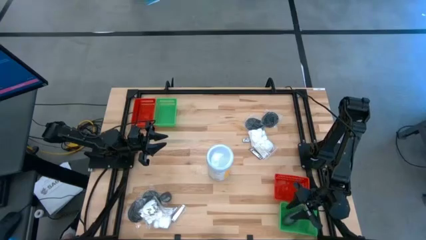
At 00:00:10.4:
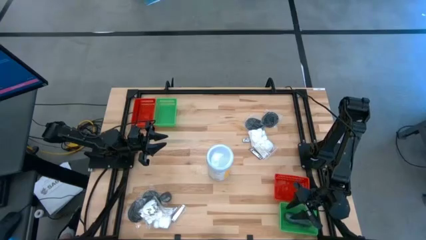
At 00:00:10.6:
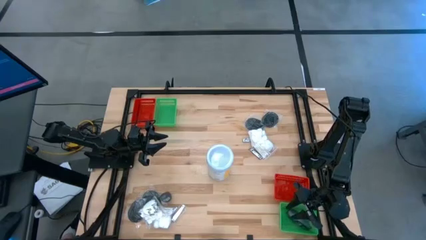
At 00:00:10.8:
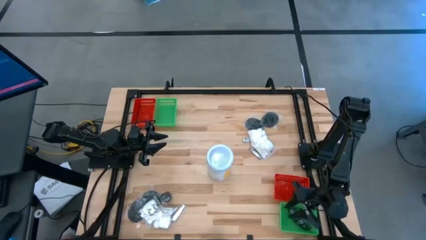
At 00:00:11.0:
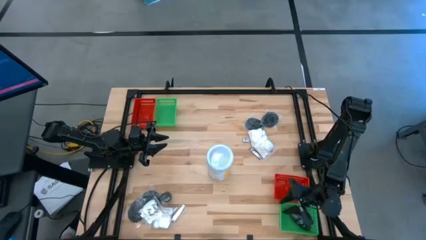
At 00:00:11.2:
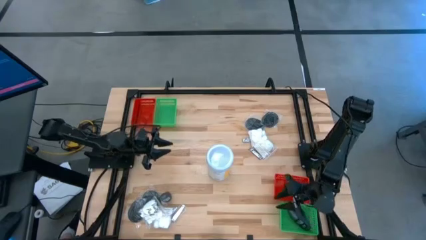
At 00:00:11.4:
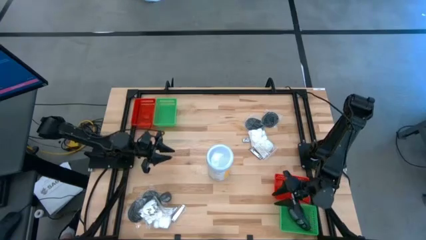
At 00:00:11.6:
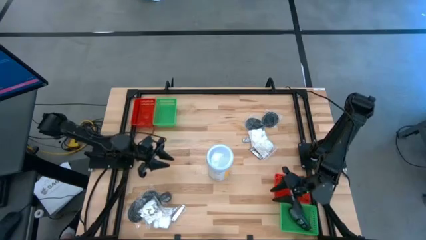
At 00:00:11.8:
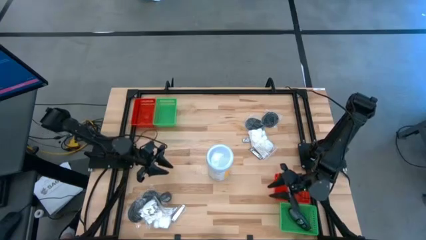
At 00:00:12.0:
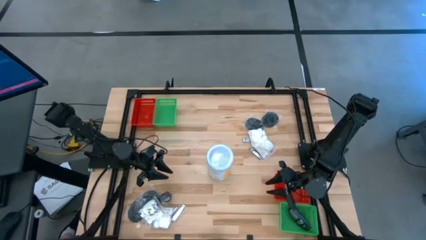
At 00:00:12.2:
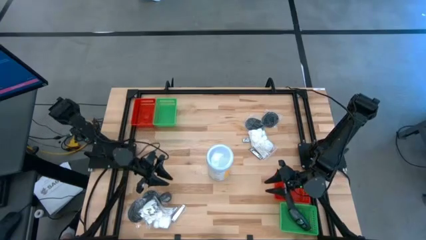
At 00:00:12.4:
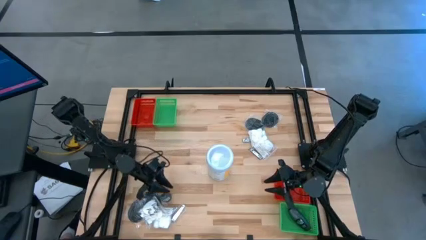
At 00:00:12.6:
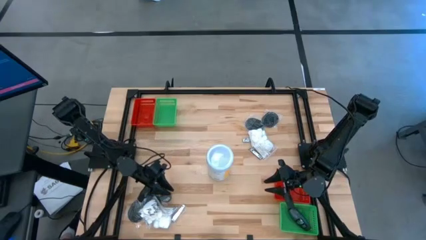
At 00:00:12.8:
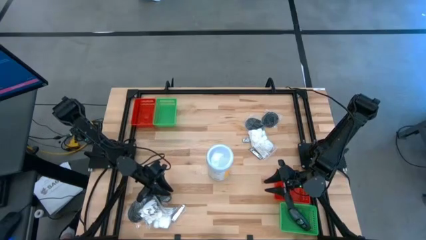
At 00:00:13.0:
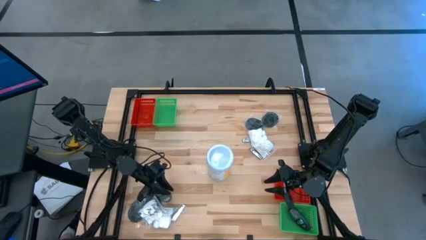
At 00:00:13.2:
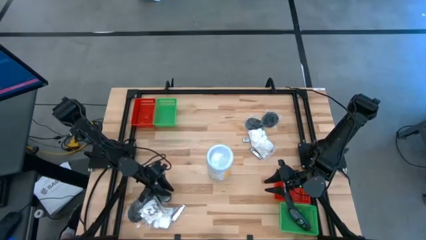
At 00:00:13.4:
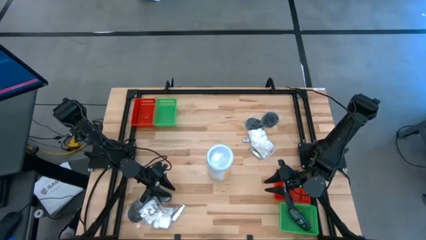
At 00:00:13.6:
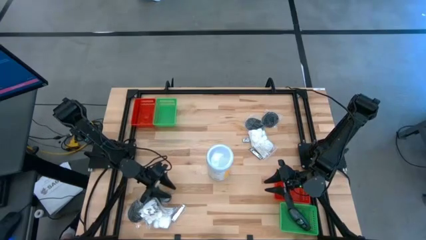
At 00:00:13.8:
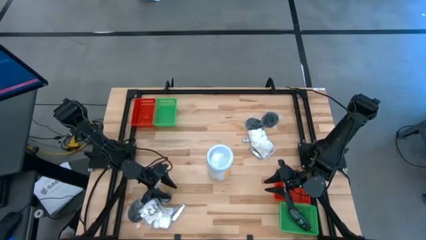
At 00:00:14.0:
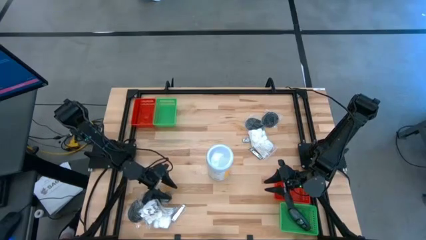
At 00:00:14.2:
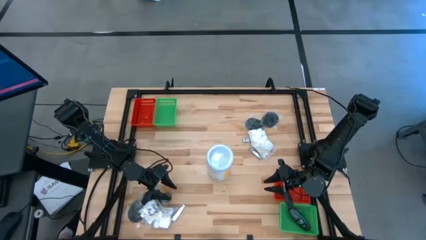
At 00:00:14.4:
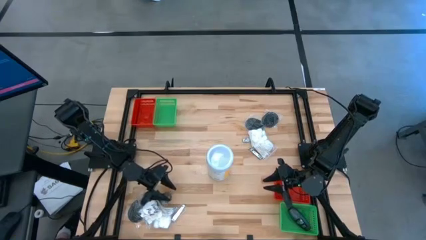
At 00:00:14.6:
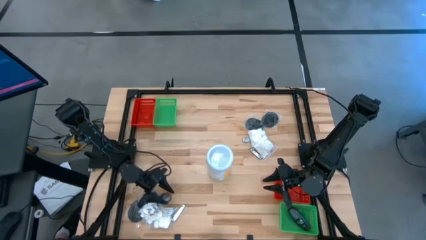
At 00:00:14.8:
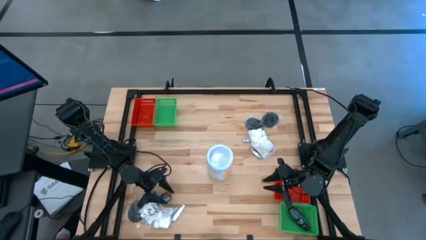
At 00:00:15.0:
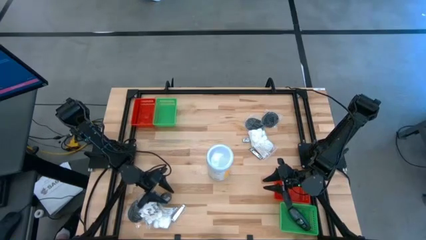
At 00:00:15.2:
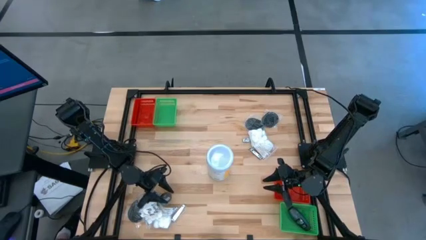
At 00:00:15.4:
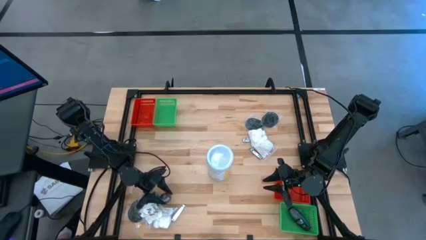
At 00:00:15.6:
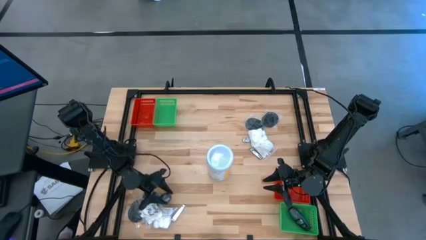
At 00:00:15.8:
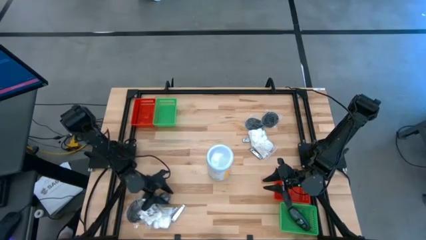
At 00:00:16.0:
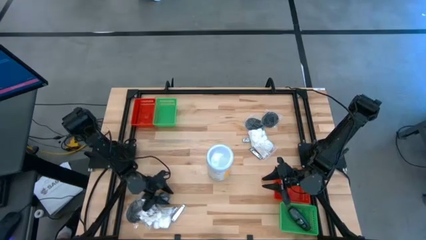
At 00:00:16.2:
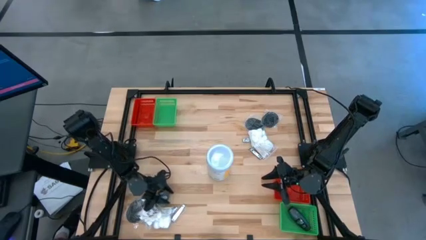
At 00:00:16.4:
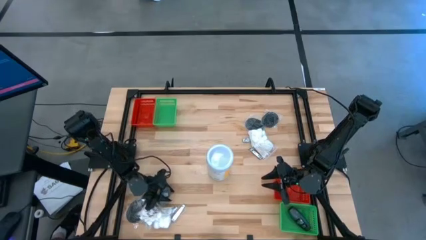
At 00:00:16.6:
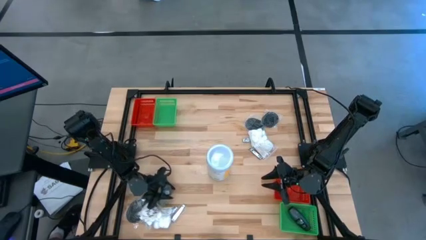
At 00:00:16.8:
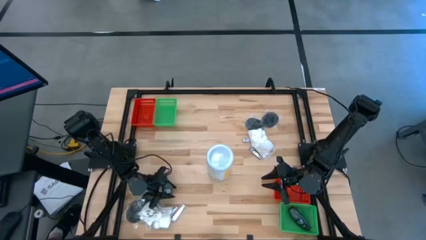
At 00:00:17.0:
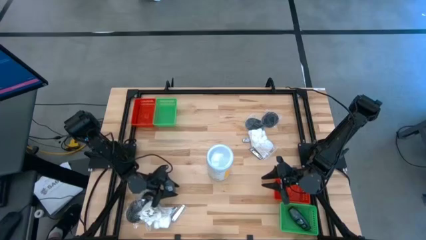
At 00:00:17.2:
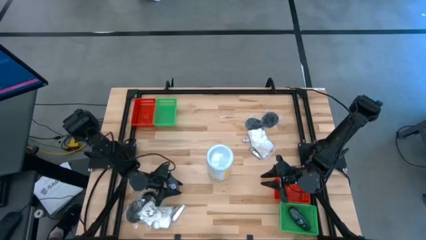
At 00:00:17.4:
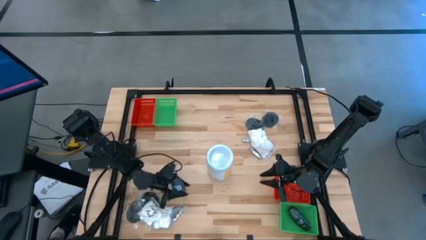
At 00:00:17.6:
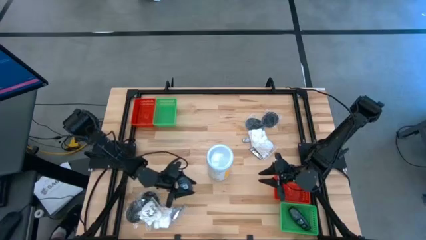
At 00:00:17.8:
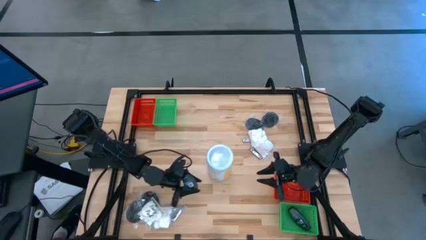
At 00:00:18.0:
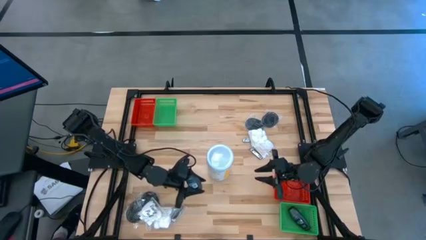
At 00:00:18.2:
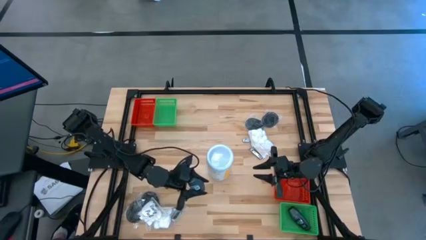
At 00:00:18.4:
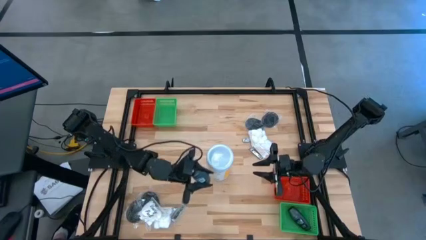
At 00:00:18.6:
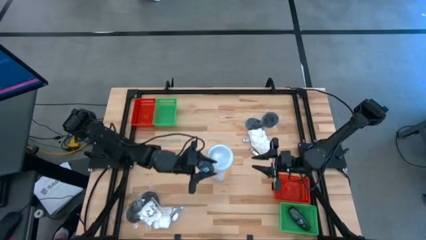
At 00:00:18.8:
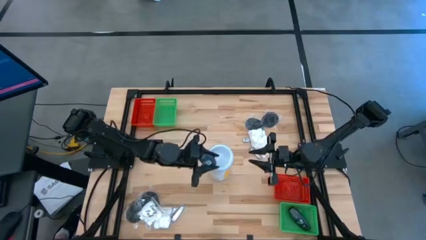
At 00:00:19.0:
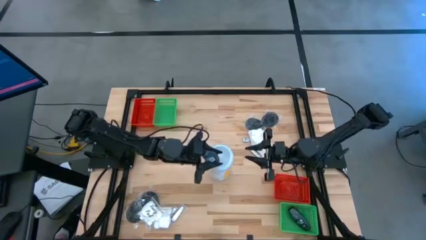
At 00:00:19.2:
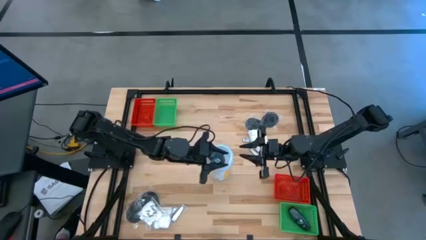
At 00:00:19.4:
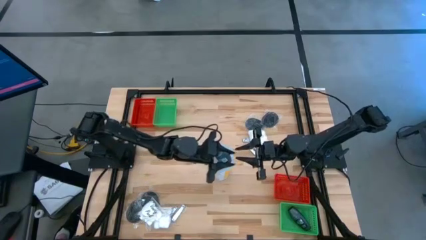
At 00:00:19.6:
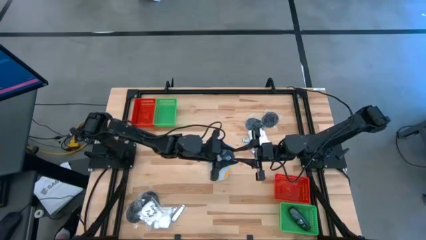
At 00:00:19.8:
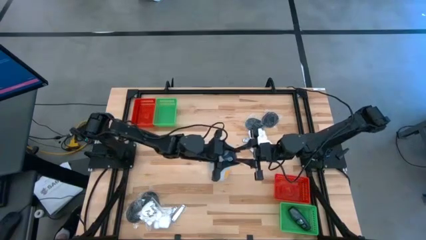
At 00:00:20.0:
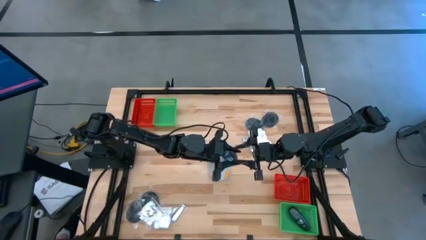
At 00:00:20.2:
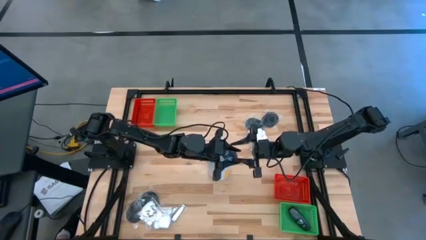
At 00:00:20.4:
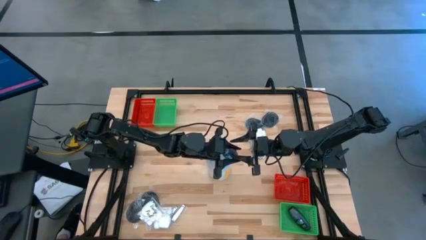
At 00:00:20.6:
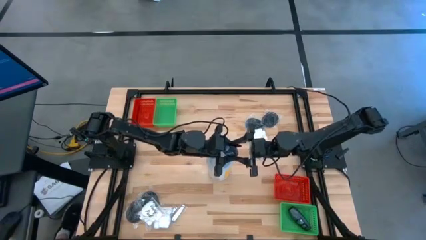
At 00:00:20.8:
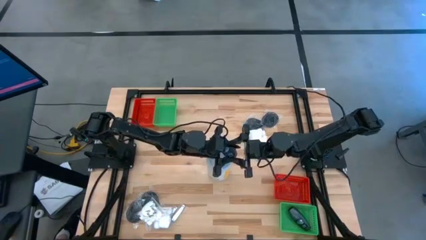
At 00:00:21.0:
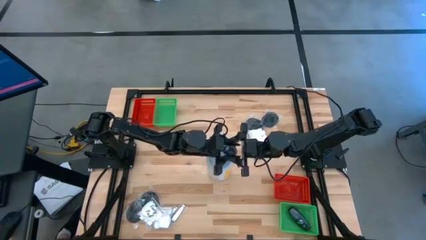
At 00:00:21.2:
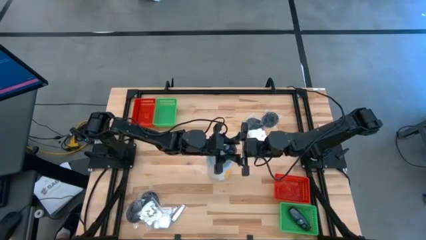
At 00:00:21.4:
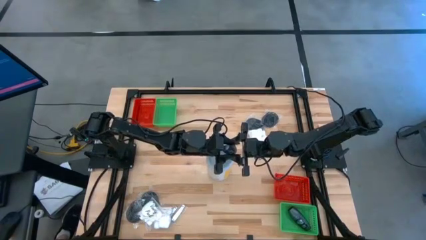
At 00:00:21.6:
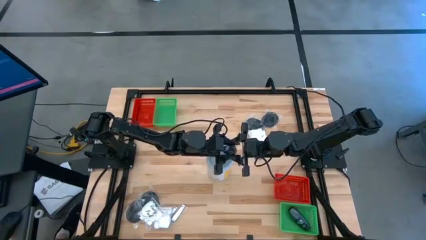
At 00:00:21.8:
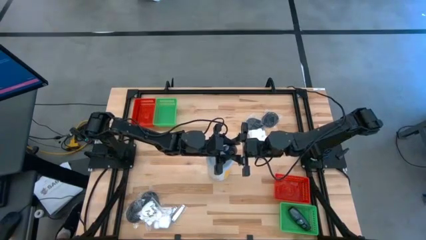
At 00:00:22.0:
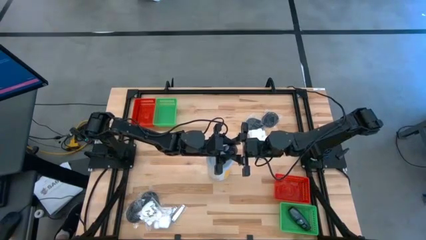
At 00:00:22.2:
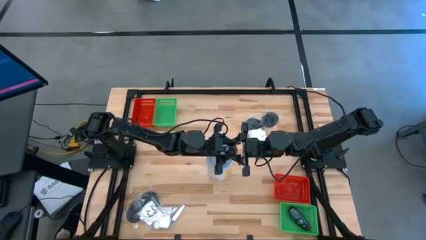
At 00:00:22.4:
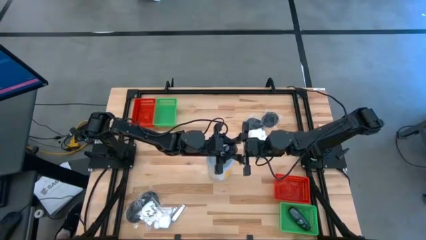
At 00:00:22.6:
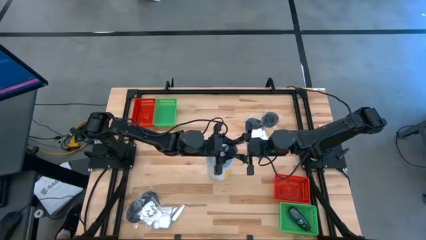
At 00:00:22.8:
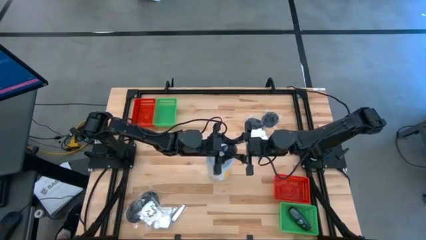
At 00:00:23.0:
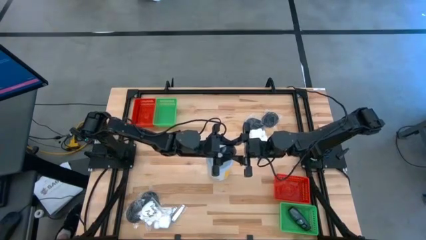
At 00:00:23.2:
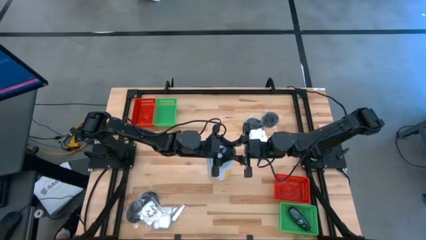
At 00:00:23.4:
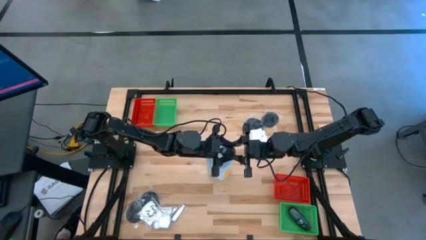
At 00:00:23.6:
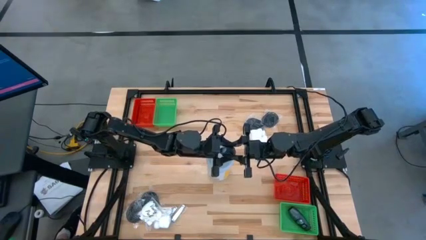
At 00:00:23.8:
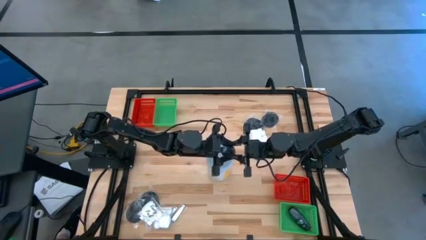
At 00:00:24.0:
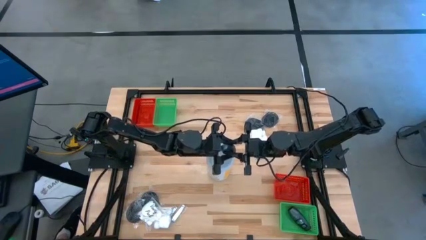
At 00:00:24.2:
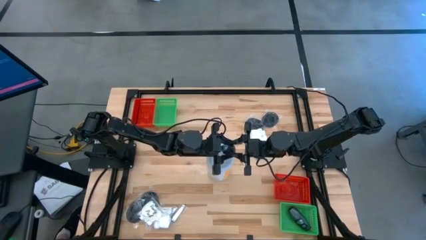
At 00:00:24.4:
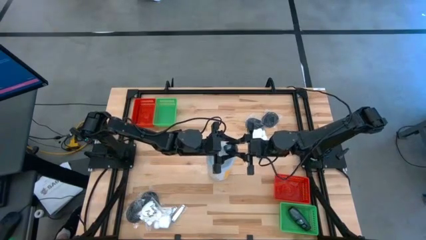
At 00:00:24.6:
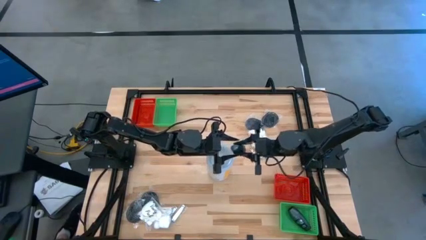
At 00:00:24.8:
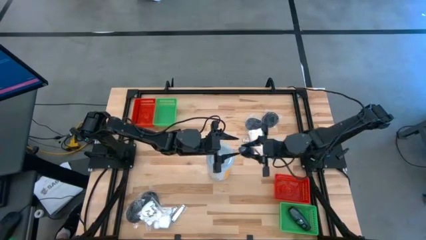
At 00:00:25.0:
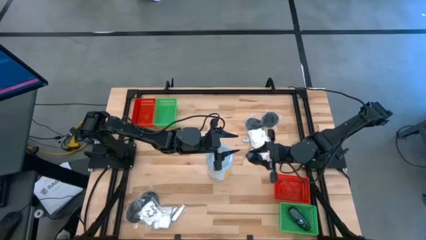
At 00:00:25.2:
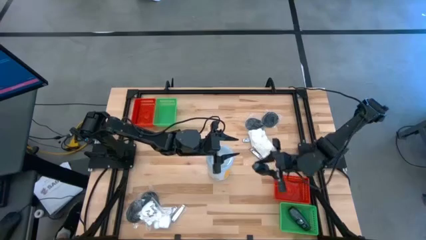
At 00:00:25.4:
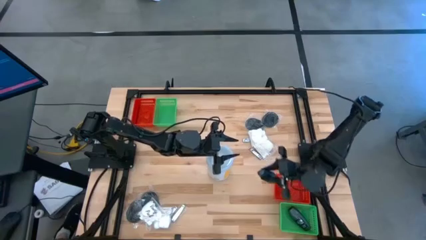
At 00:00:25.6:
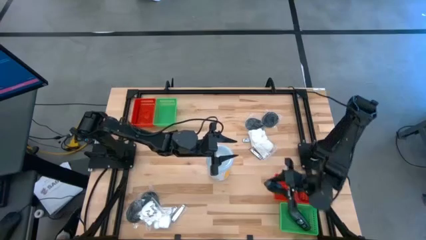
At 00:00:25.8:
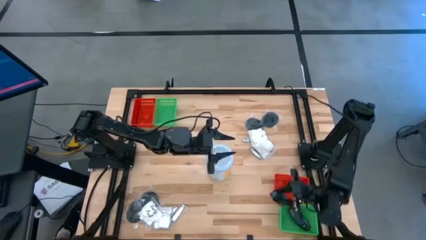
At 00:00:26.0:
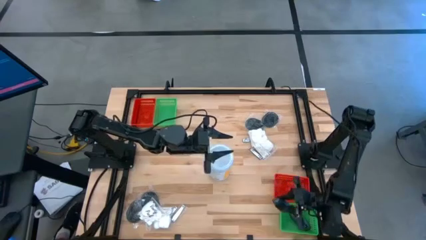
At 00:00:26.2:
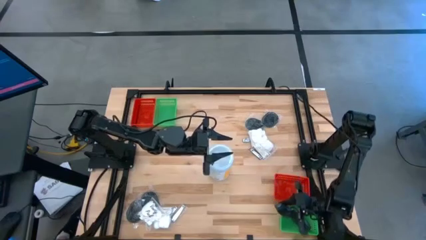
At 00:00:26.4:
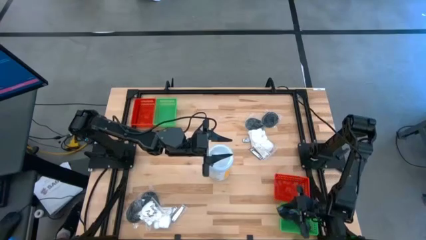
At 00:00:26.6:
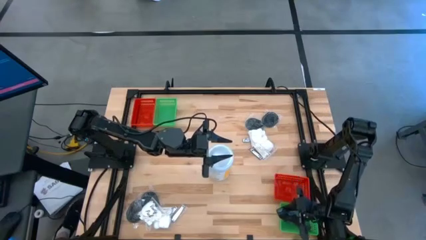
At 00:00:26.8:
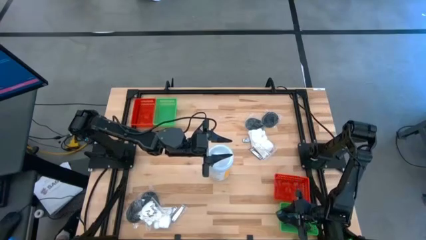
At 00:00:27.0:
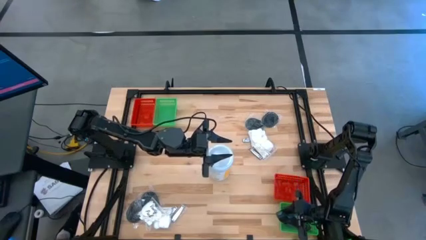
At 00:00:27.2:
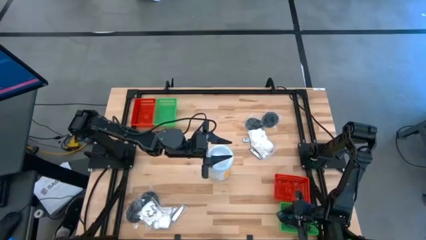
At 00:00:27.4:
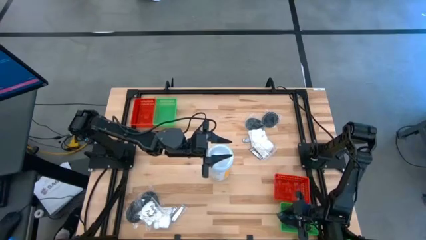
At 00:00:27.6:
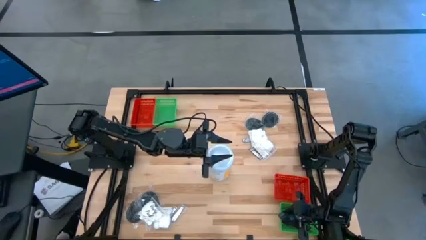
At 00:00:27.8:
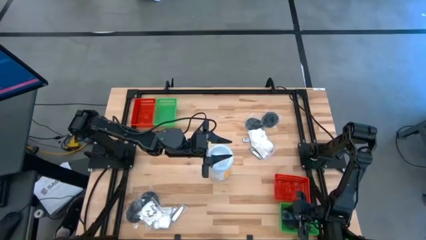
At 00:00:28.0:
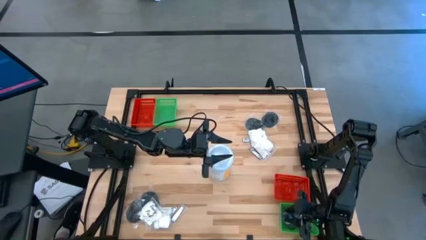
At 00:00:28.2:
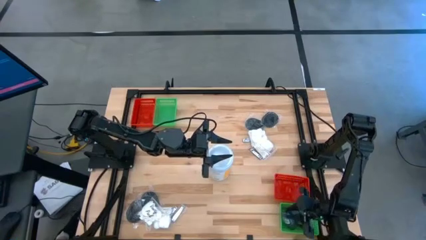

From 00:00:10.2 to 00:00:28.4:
Task: Pick & Place Travel size toiletries
Put the gray deodorant bottle into the bottom green basket
